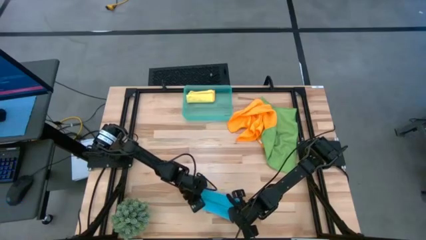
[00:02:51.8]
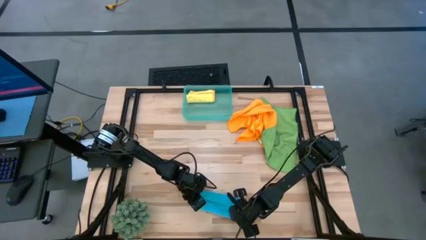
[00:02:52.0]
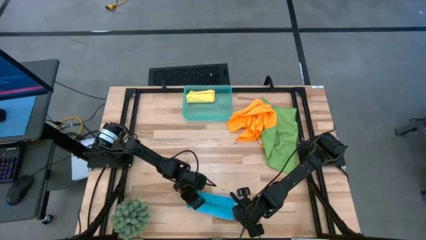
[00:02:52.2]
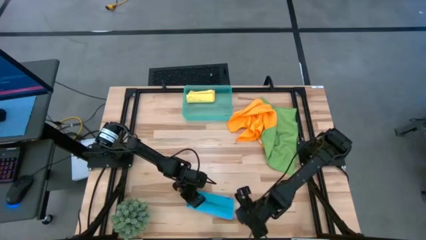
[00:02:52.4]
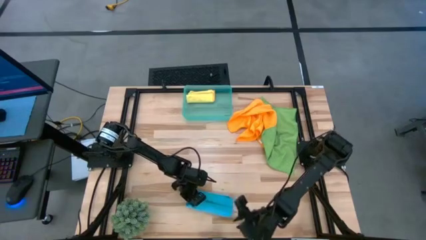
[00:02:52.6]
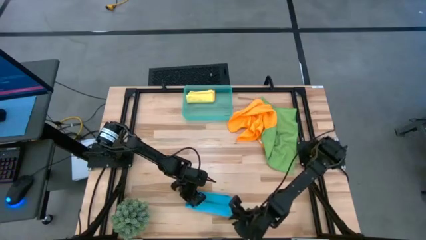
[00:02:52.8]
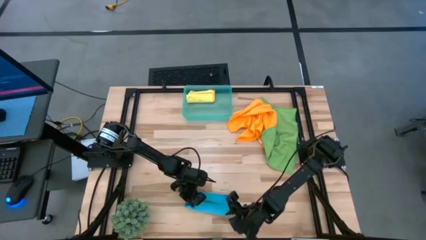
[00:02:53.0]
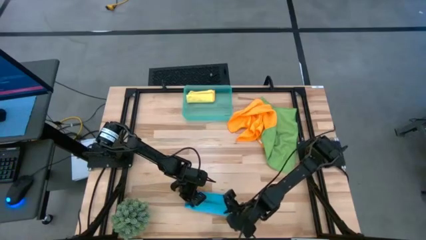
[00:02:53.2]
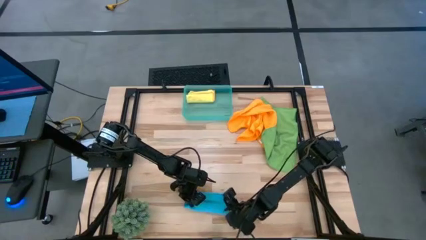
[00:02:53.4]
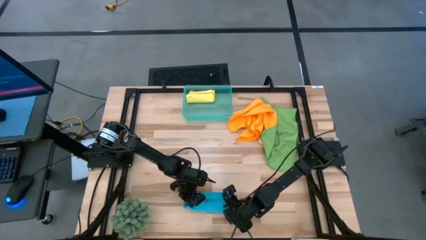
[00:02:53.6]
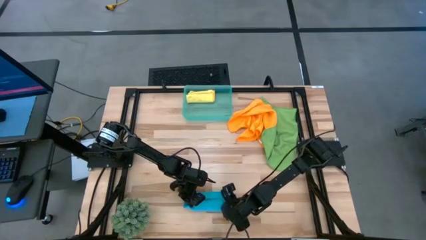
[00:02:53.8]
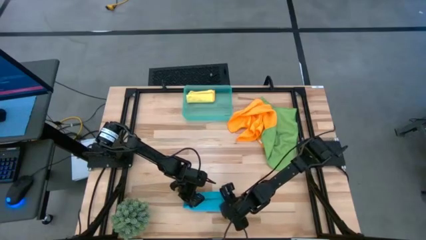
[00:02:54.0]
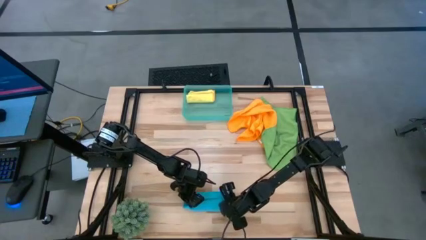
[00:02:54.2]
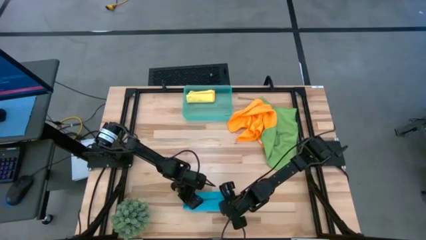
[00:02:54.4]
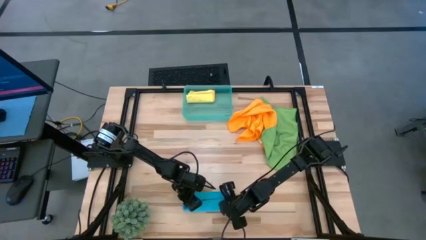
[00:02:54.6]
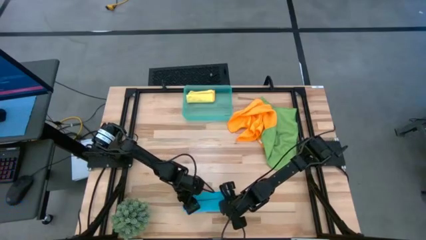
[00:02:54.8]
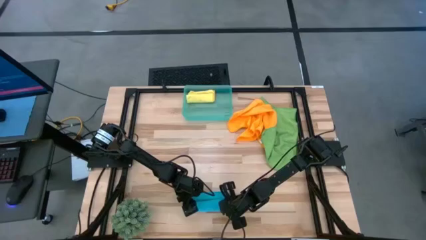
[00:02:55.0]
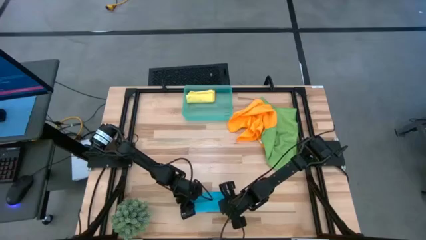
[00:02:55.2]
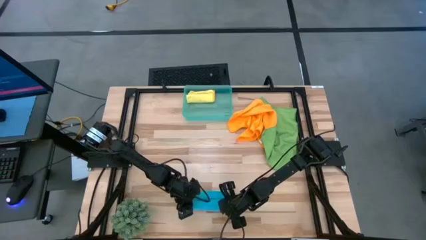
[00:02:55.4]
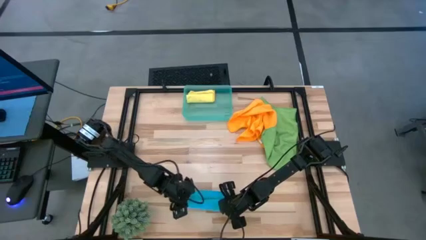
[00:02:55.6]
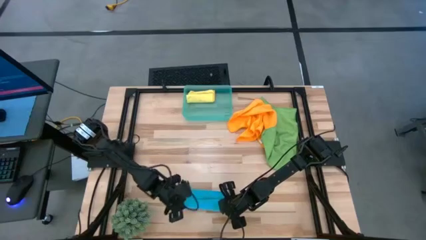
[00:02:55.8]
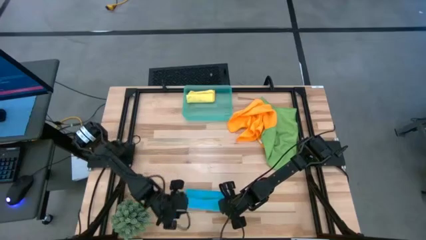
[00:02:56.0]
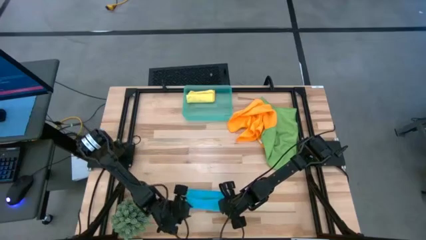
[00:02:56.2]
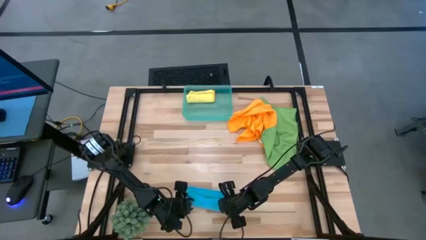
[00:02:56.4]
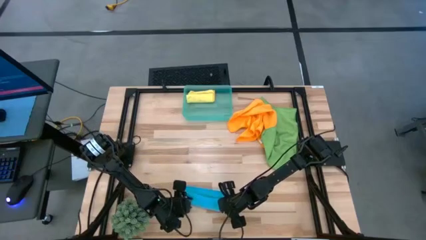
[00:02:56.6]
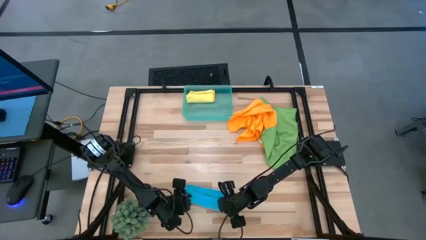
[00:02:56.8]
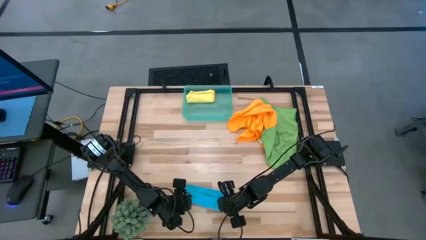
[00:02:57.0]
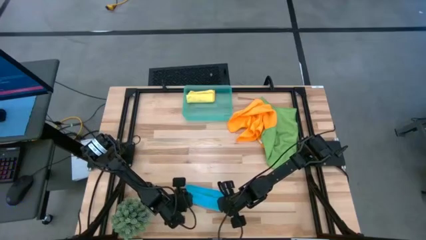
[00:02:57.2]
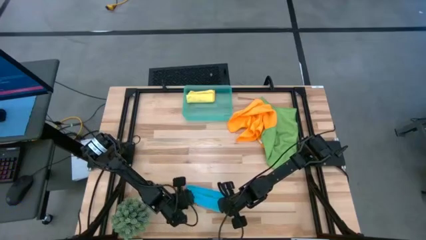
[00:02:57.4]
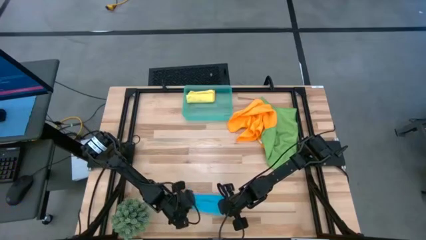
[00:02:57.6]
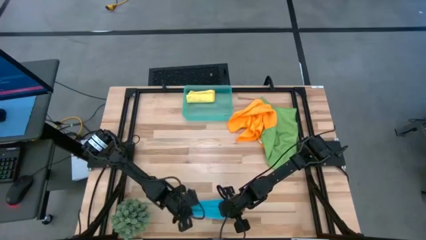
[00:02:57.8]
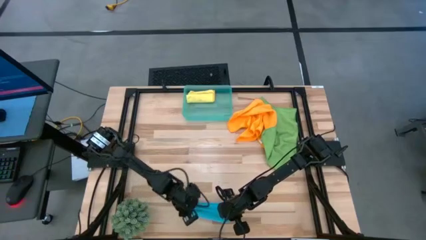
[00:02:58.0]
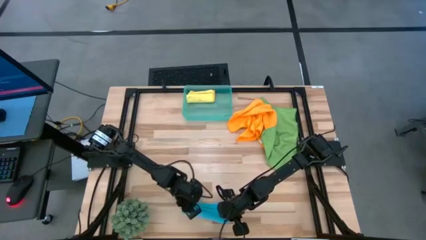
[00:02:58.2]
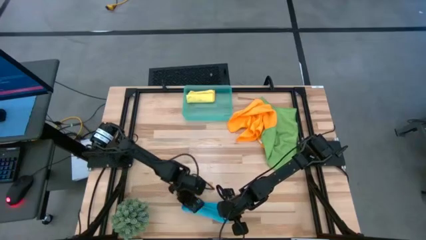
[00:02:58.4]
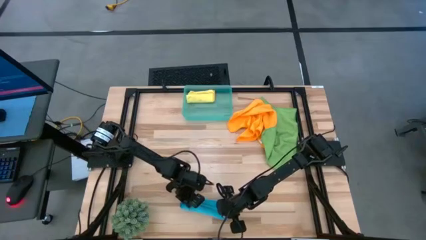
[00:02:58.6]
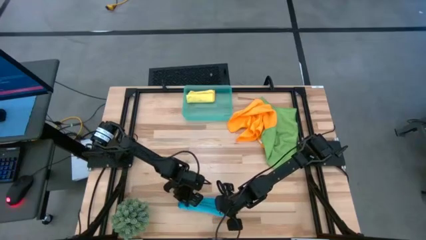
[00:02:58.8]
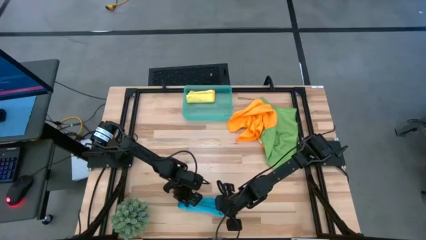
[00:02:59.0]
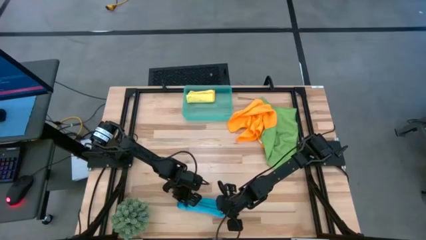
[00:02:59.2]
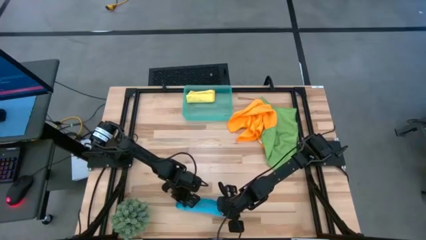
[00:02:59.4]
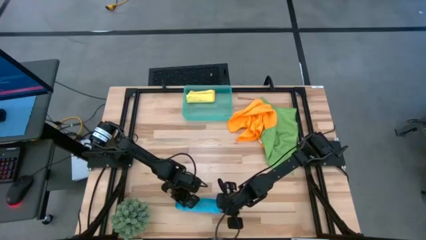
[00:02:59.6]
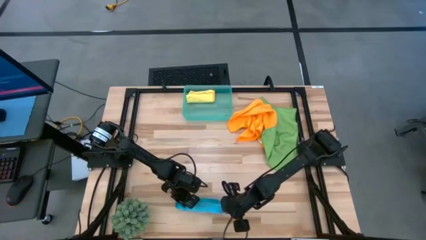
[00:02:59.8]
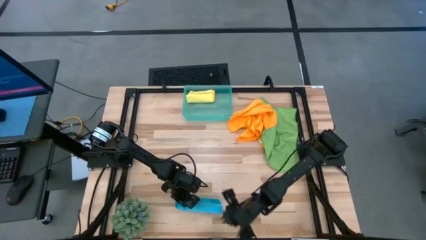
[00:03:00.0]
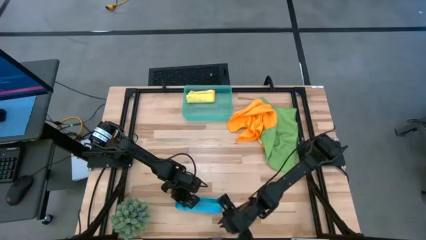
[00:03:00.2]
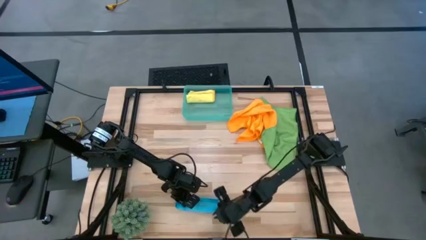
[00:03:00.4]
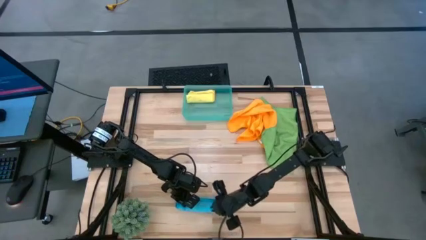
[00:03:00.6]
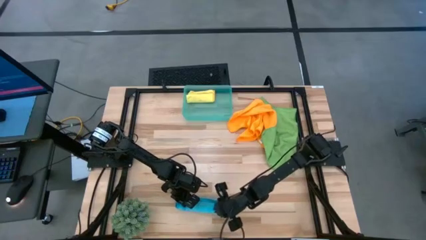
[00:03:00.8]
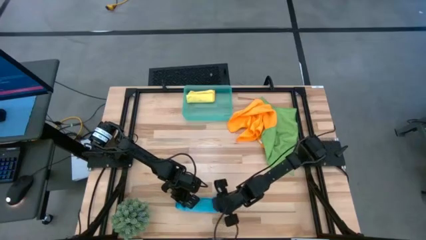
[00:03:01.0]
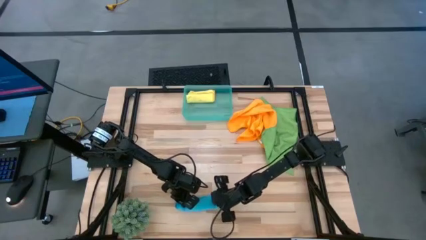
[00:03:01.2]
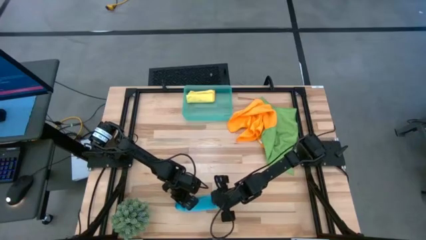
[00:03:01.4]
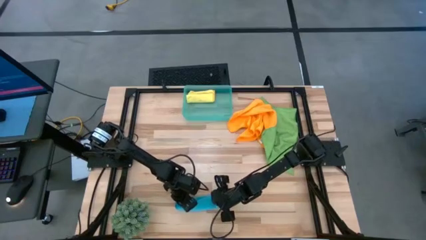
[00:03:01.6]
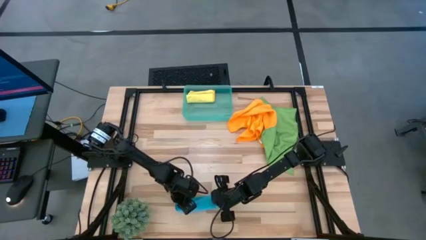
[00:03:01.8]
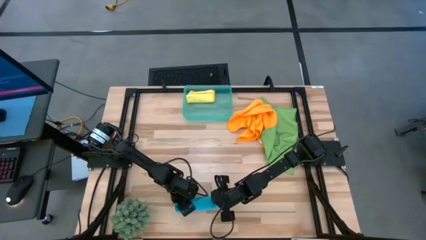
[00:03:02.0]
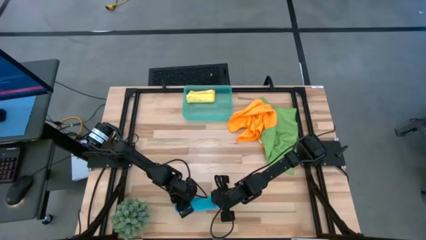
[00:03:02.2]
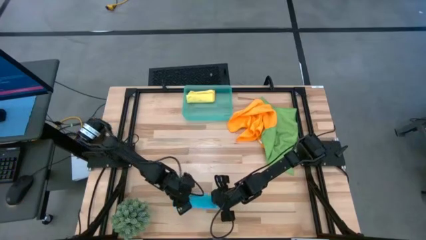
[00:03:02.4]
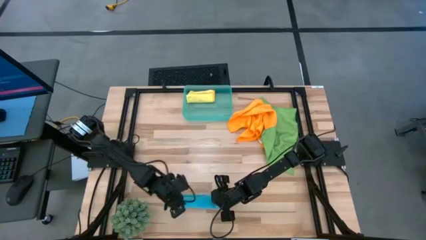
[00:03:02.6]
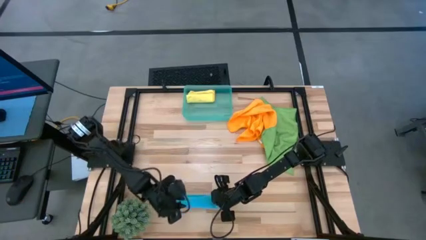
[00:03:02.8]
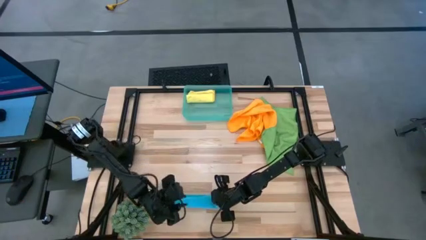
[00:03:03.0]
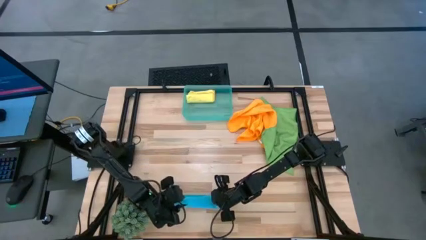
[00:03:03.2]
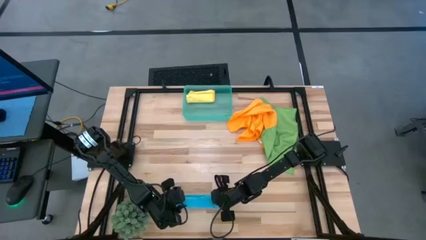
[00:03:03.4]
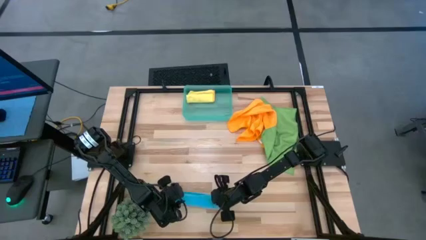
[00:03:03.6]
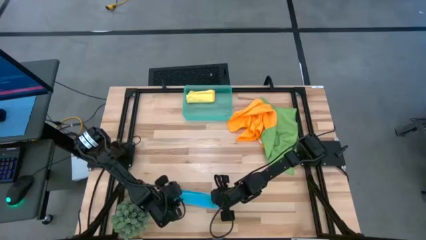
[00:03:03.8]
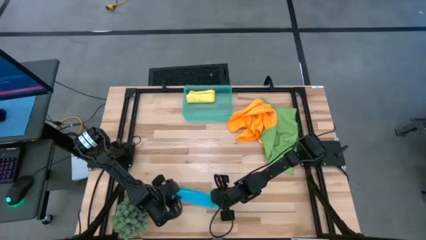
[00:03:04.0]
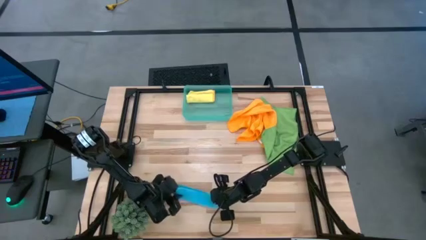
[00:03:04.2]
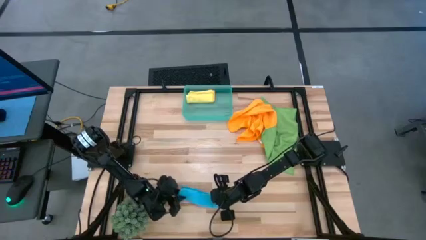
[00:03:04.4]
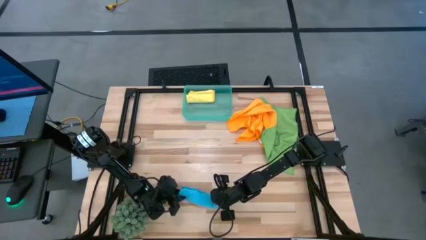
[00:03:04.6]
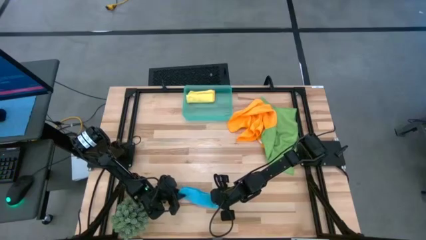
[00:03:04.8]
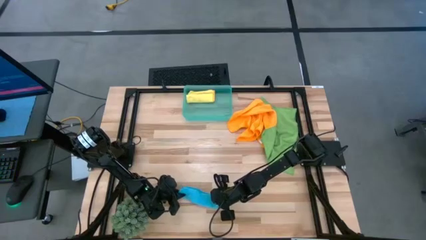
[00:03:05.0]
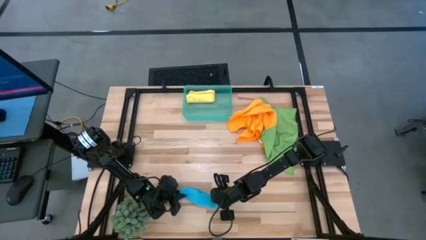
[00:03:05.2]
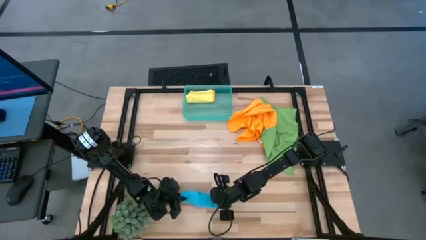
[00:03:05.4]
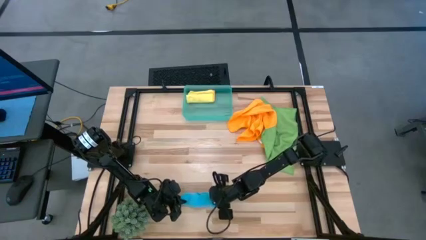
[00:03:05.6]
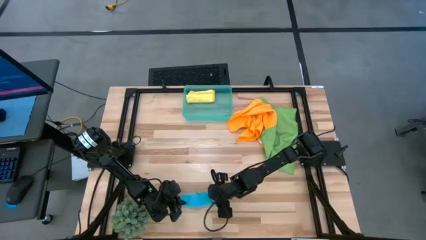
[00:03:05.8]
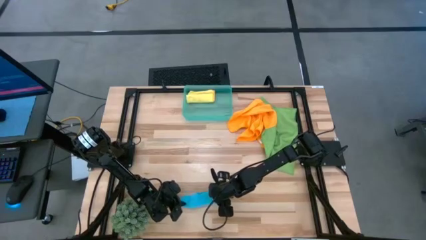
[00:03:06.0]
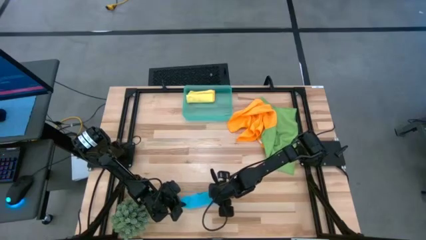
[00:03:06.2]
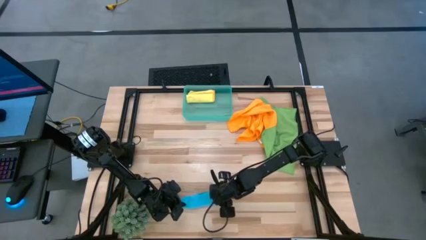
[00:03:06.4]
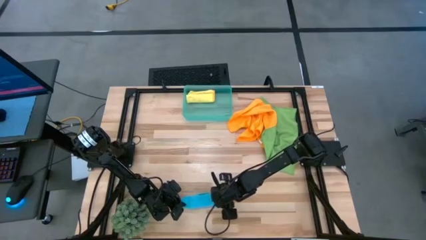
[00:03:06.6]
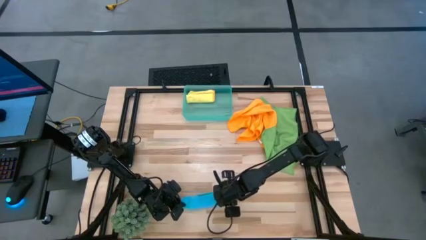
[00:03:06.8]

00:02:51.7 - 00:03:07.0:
Task: Roll microfiber towels into tight, uniform cylinder then place into a basket
Roll the blue microfiber towel
